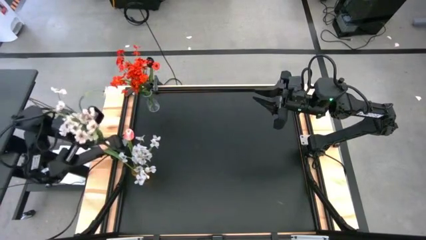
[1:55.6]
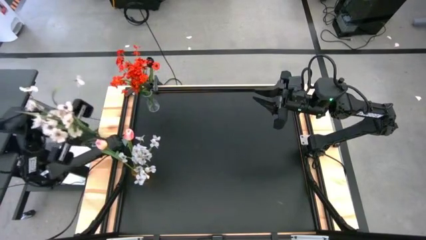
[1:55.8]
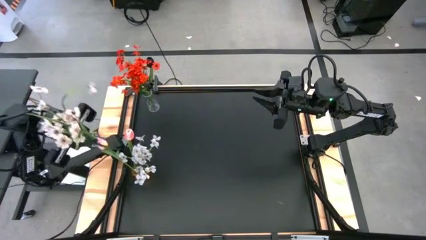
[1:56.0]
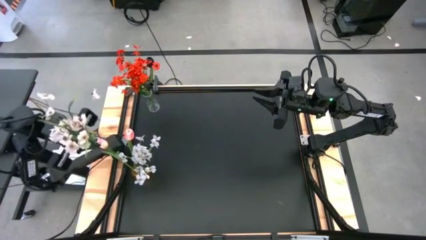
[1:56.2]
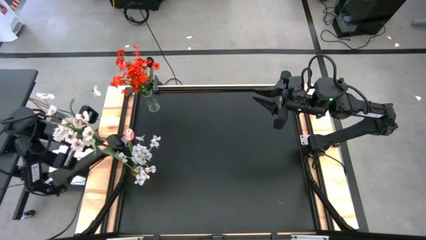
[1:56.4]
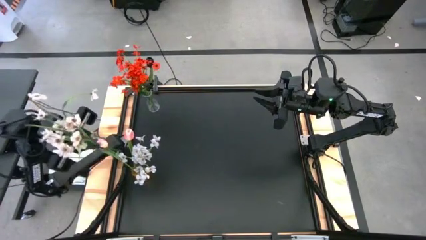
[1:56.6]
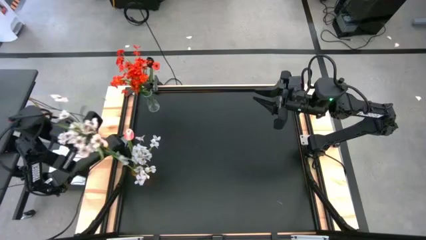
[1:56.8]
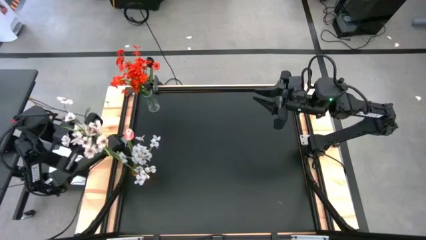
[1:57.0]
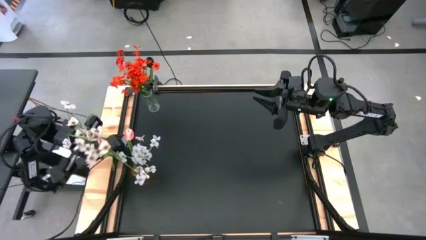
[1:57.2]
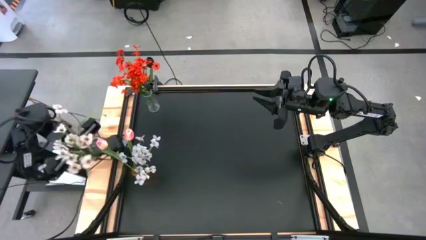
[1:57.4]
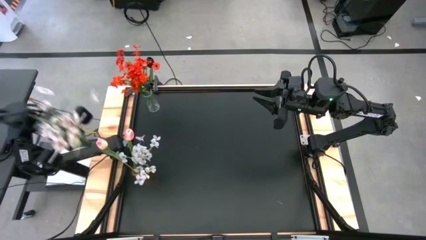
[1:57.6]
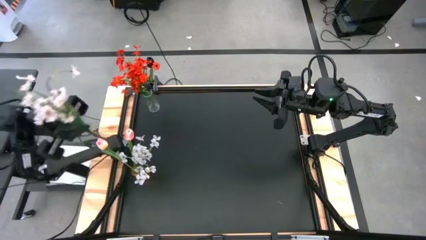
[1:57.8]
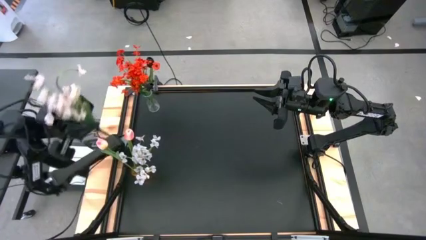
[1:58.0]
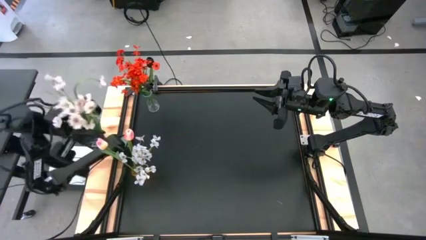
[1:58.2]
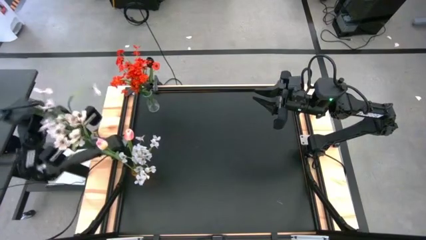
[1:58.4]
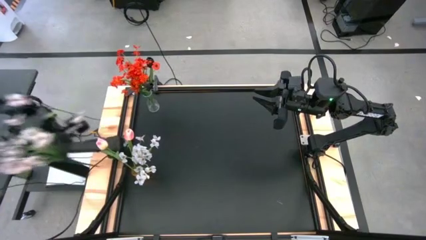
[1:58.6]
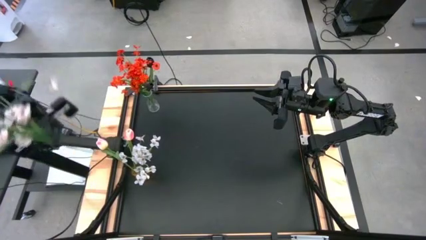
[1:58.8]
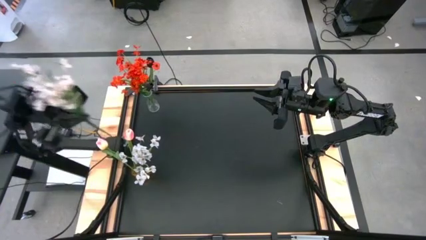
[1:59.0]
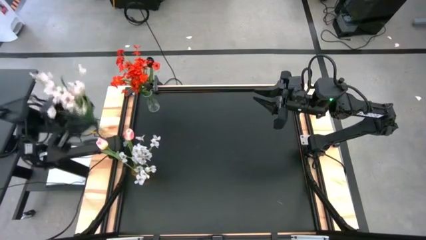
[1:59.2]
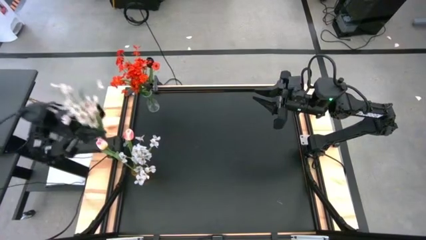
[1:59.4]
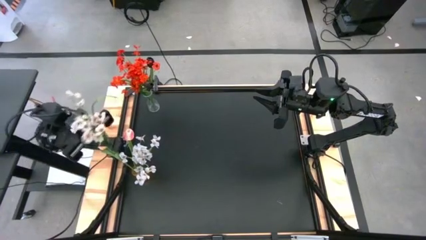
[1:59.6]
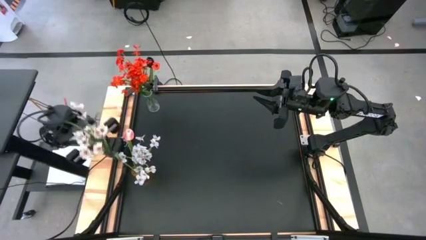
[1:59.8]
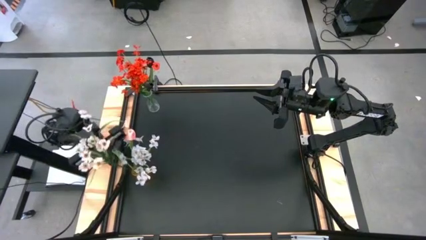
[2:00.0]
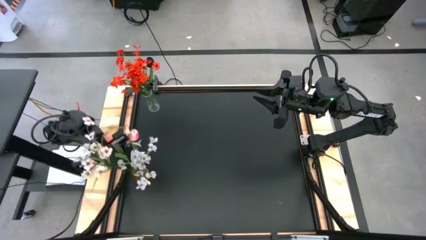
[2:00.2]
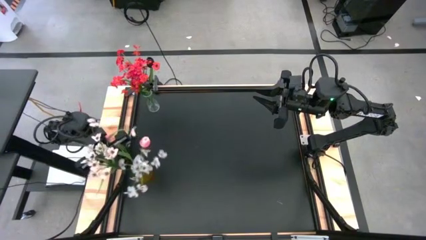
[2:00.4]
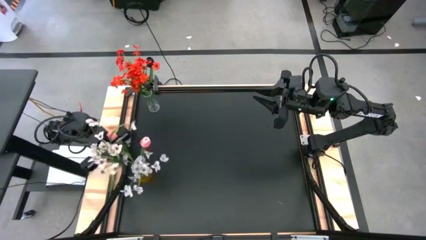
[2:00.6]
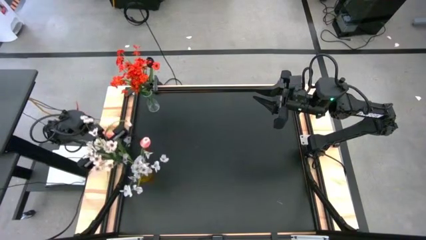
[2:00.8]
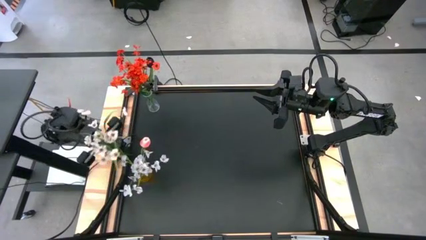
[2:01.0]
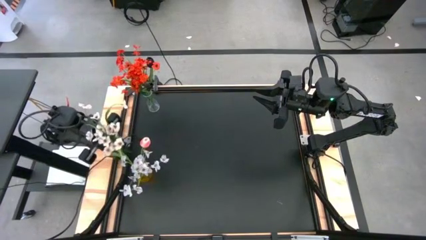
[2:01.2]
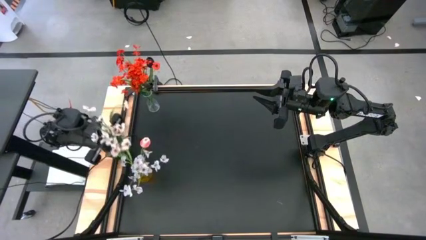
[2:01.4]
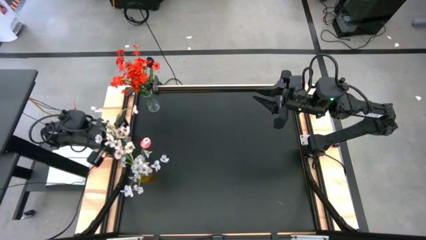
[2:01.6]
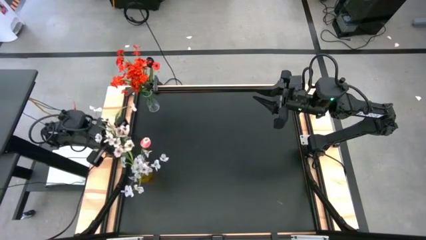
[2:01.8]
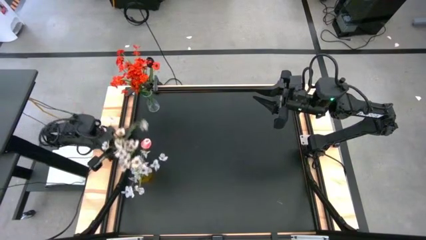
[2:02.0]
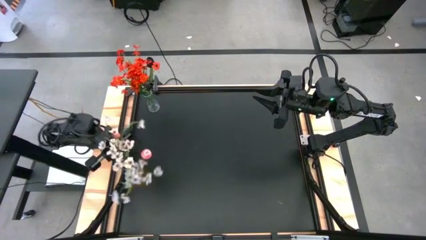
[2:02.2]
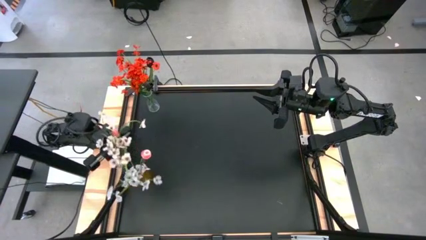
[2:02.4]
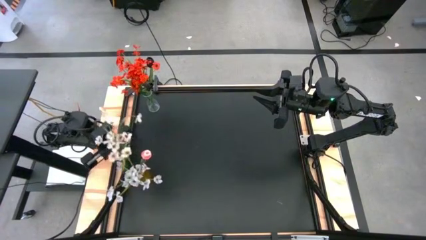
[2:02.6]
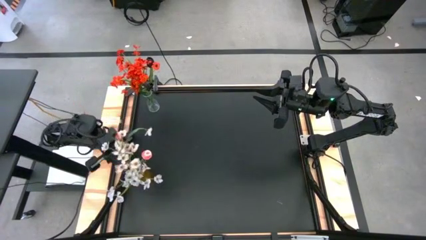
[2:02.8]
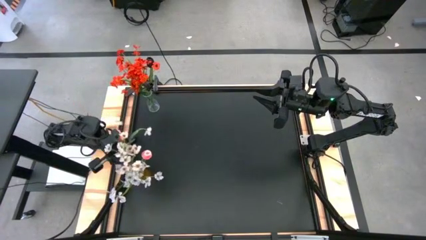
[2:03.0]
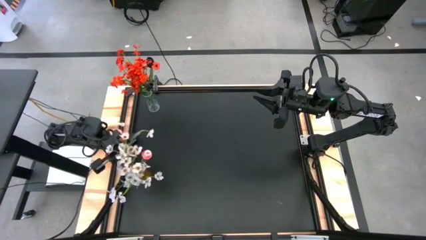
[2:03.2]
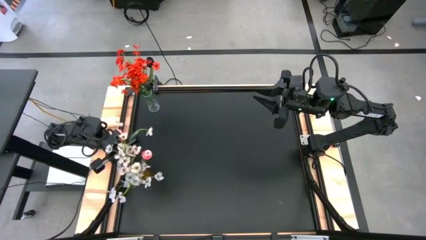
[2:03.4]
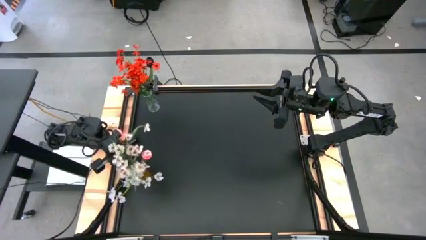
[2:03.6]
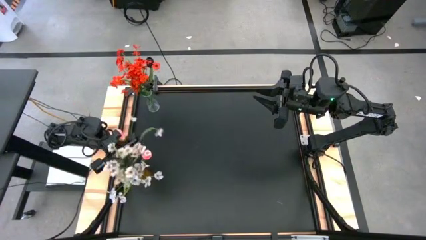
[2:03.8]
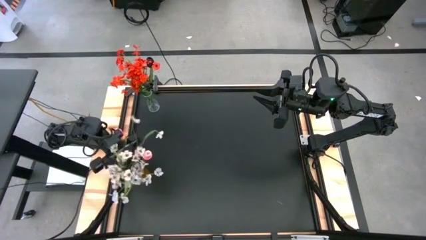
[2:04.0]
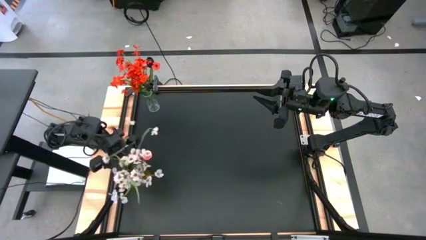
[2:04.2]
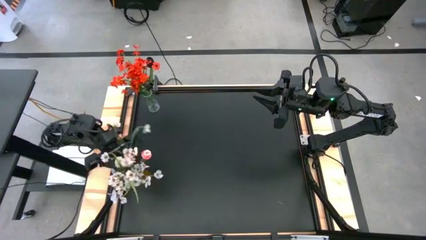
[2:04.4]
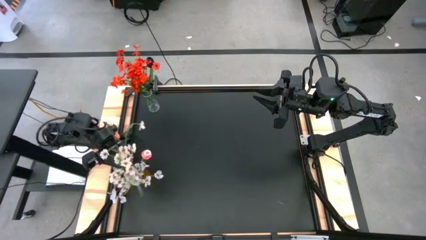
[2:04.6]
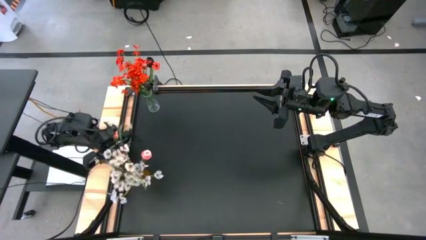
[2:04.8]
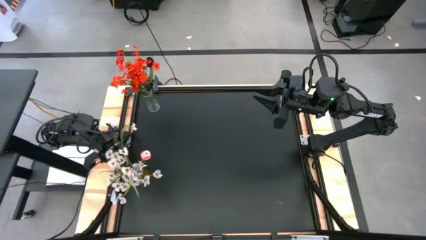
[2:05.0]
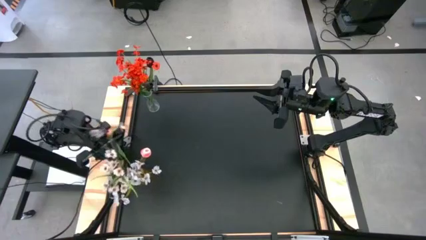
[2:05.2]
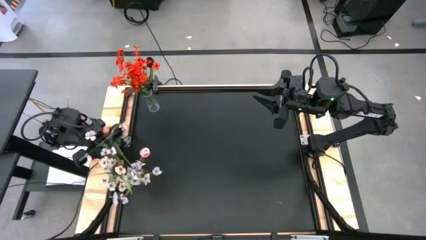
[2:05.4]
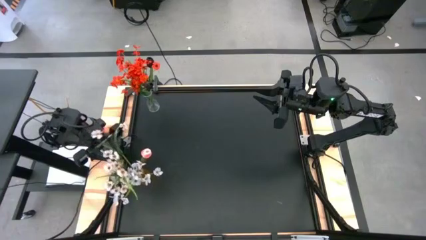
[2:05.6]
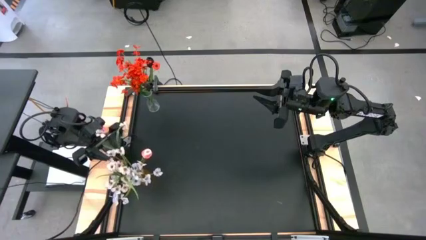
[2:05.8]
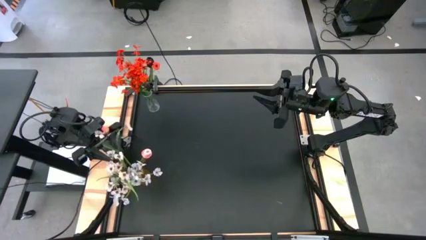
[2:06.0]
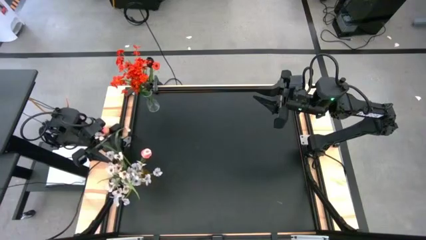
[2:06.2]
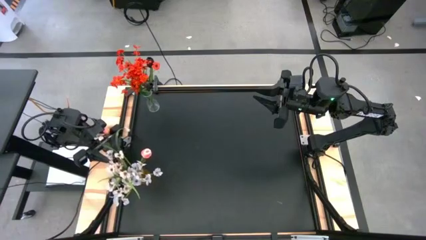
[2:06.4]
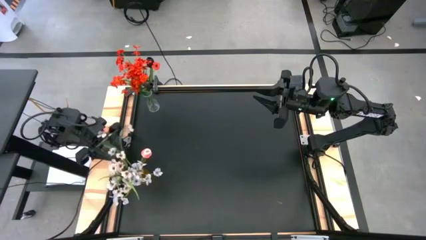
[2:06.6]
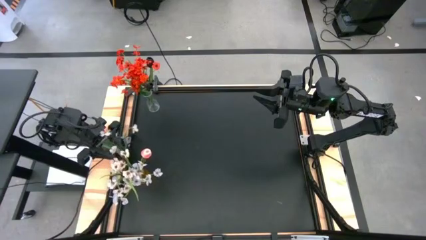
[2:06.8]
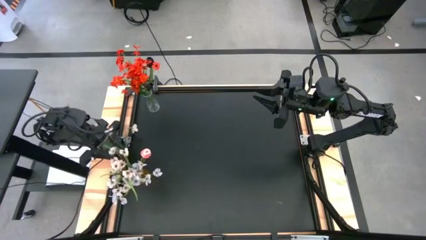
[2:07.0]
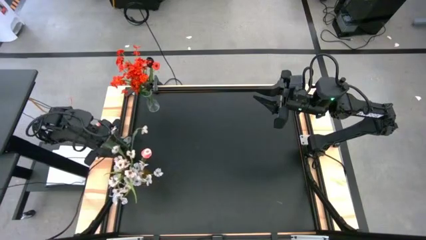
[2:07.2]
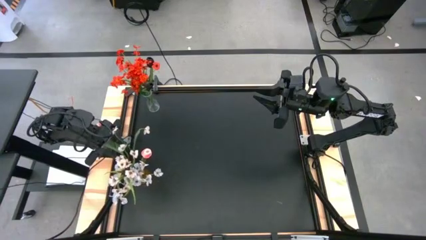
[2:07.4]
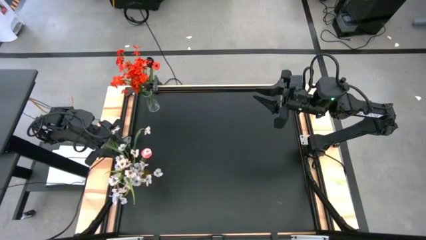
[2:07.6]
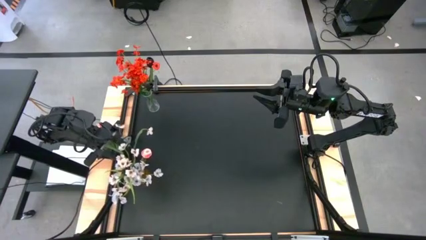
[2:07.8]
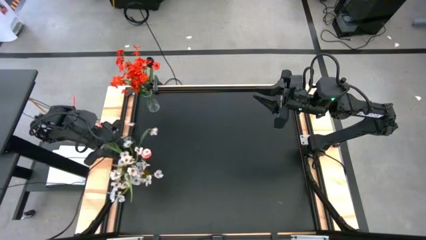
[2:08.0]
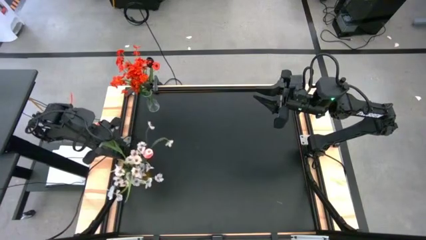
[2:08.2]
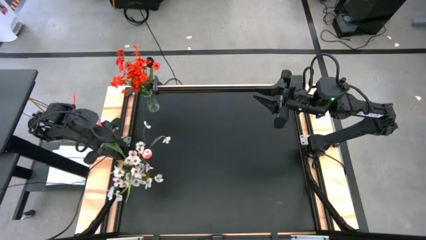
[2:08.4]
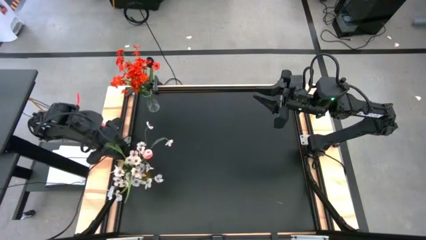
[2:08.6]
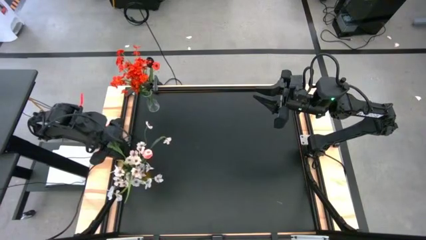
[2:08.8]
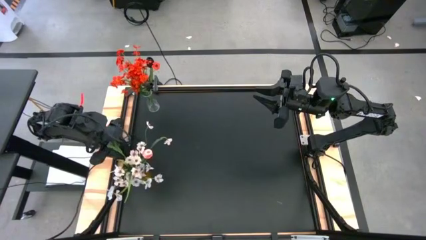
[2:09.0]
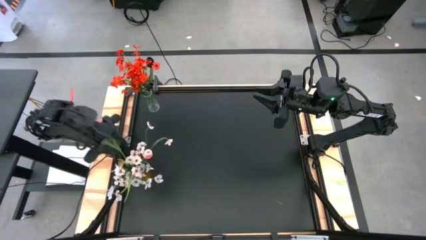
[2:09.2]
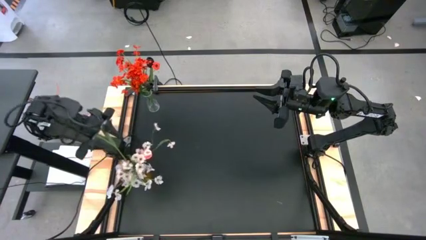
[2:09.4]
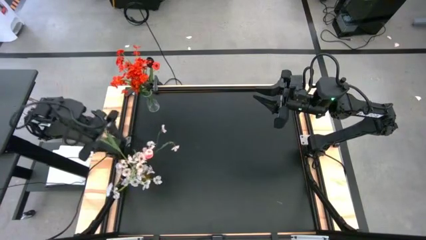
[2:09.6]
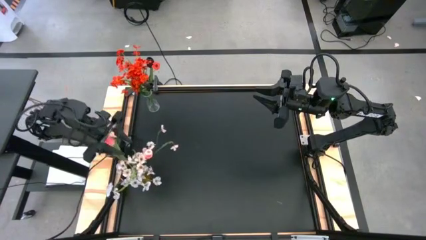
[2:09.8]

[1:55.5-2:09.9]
Task: Sort flowers into vase by color
Put the white flowers into the yellow vase

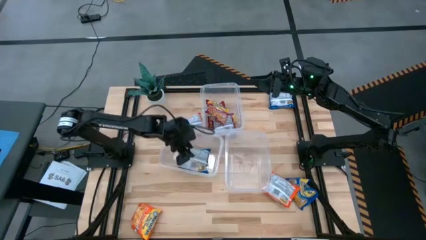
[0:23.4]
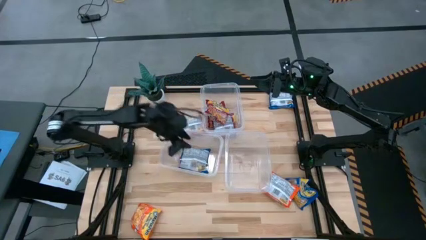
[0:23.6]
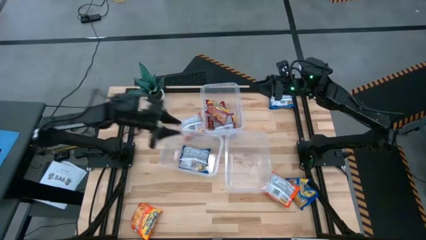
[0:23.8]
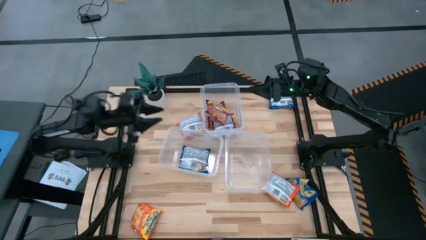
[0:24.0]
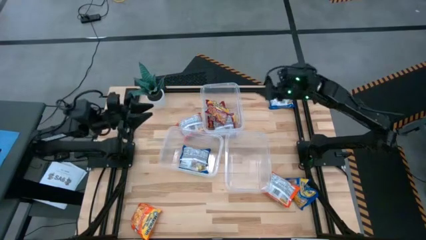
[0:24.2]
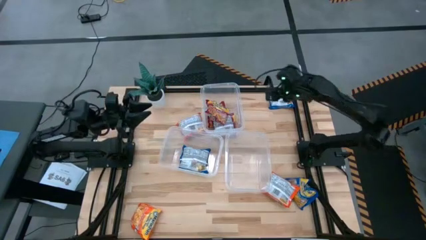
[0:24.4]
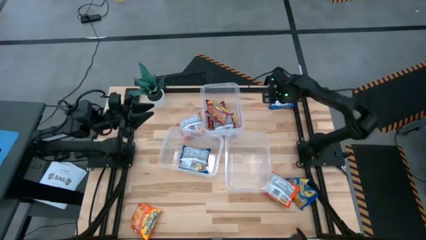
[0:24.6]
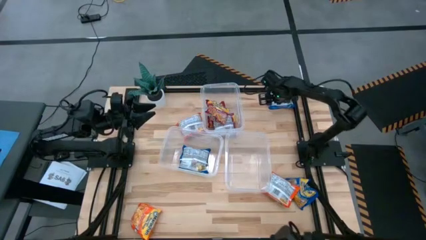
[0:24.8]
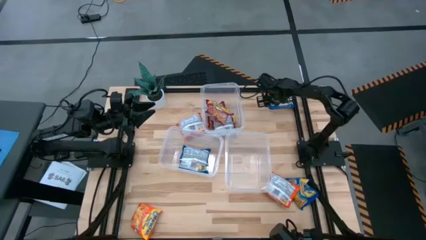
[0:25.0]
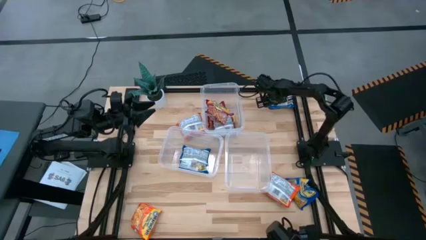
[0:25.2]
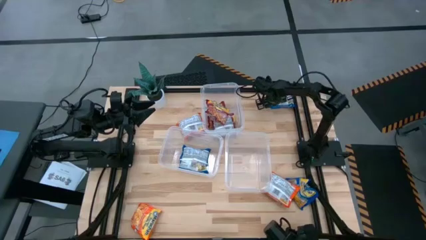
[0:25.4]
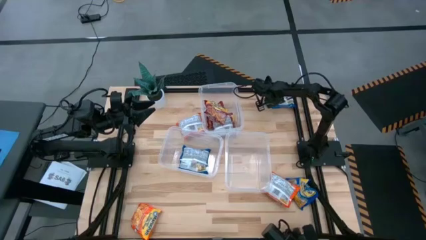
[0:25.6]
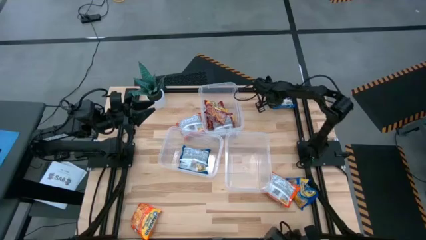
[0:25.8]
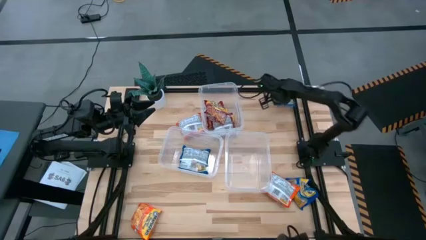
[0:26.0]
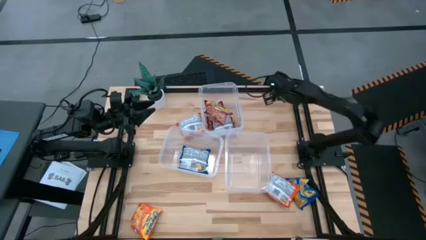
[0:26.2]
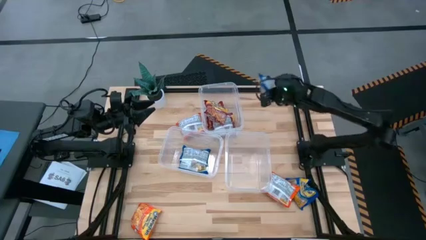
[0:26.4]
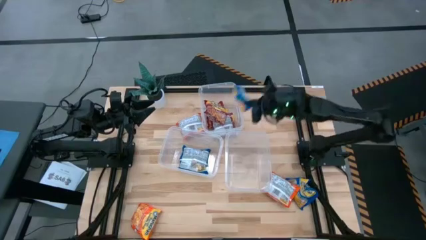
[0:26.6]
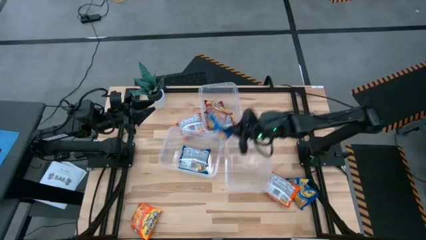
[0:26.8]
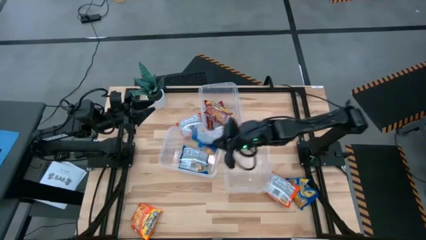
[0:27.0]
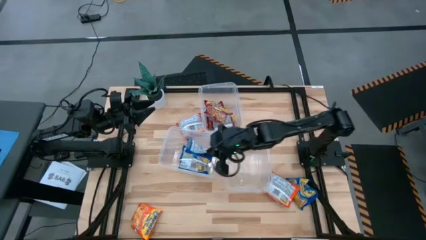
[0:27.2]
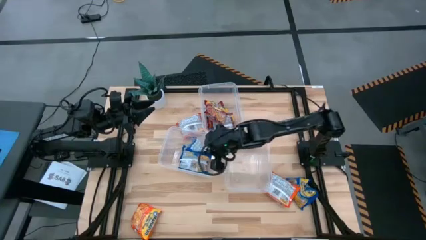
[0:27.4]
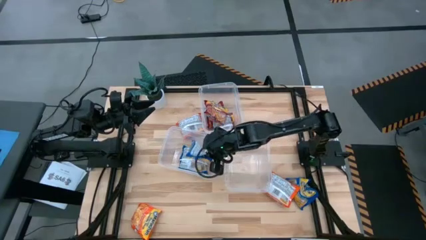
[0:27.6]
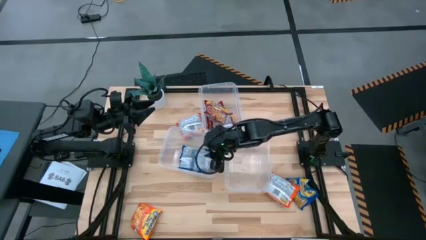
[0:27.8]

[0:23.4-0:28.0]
Task: Sort Maruchan noodles
Put the top blue noodle pack into the bottom left transparent bin
